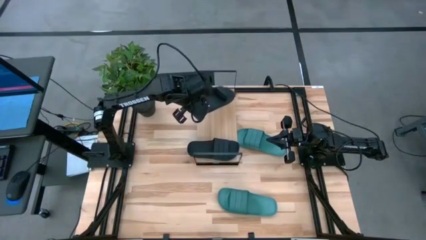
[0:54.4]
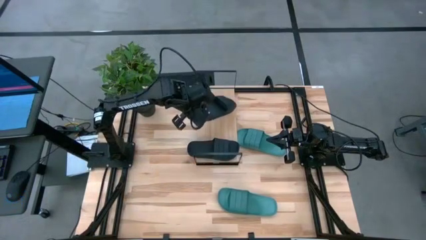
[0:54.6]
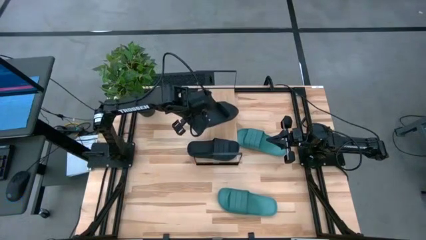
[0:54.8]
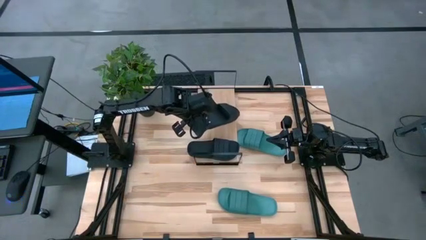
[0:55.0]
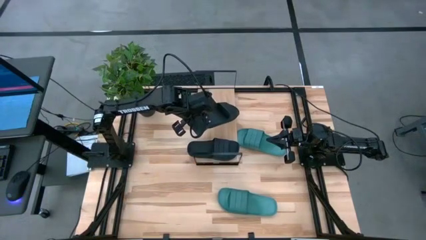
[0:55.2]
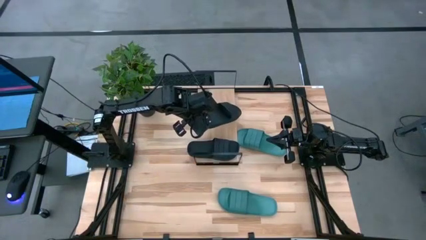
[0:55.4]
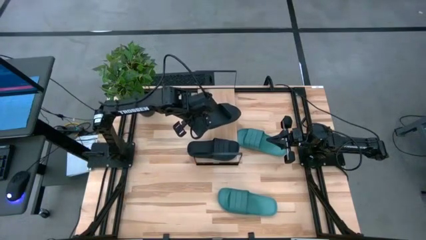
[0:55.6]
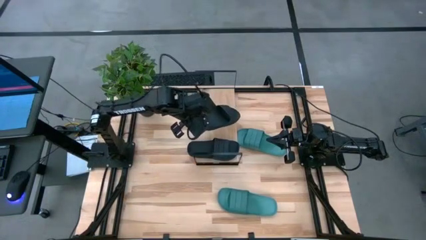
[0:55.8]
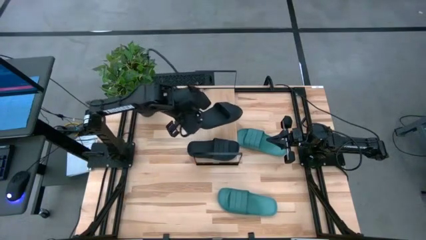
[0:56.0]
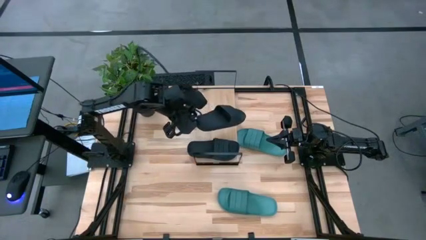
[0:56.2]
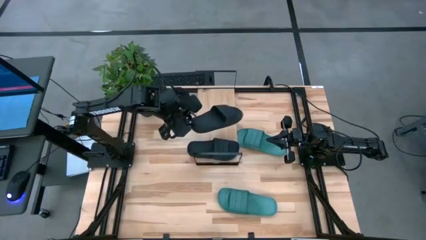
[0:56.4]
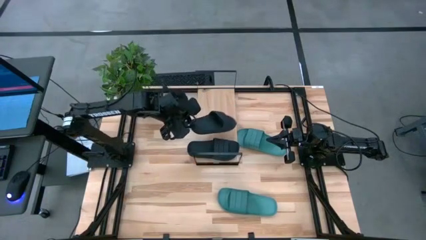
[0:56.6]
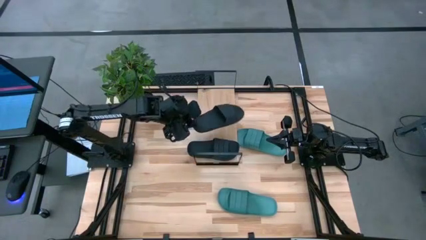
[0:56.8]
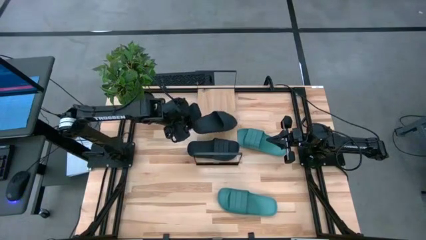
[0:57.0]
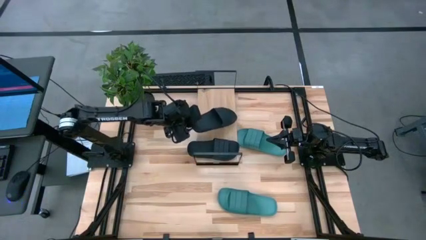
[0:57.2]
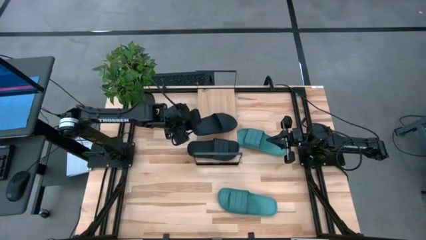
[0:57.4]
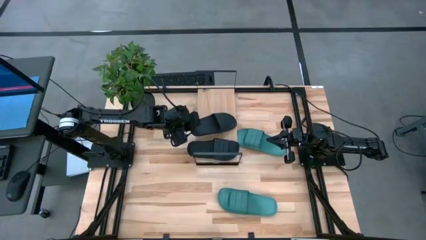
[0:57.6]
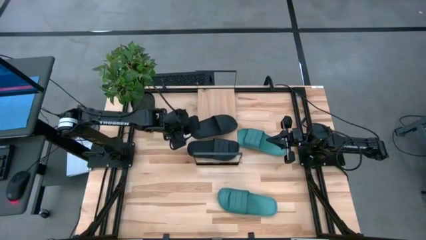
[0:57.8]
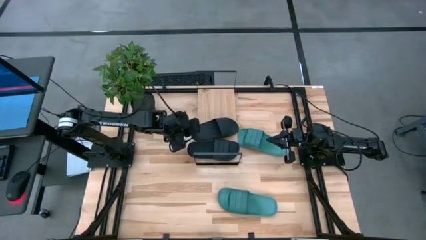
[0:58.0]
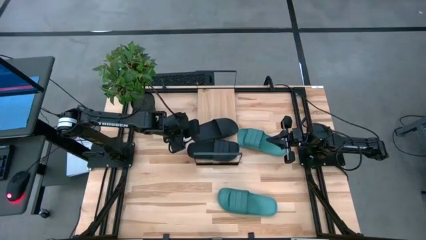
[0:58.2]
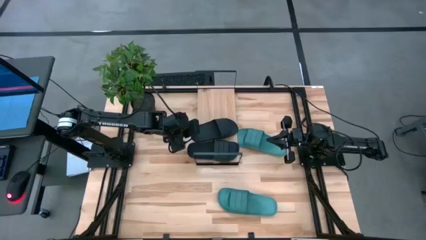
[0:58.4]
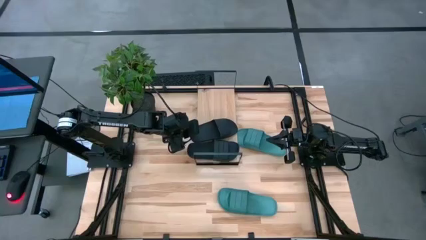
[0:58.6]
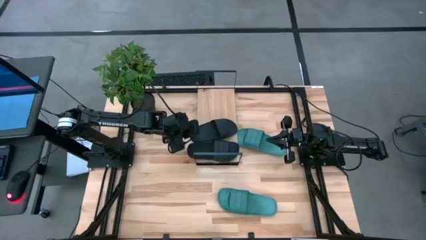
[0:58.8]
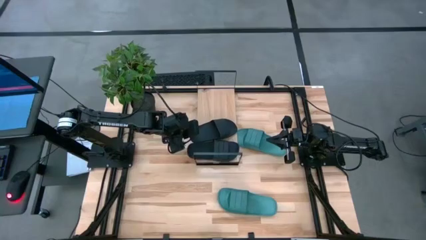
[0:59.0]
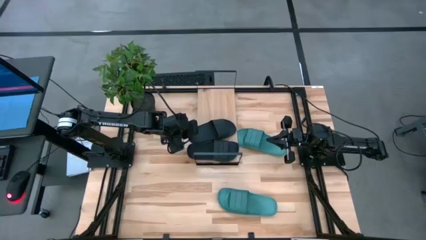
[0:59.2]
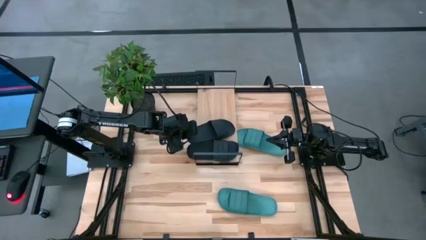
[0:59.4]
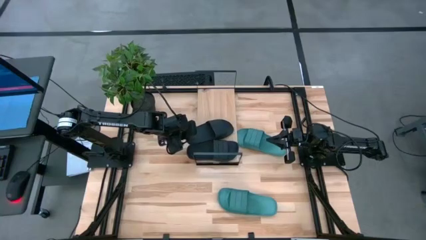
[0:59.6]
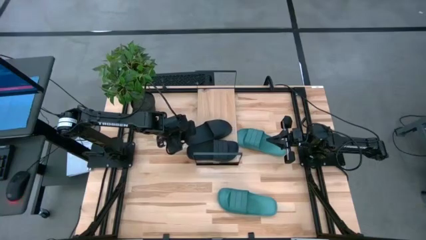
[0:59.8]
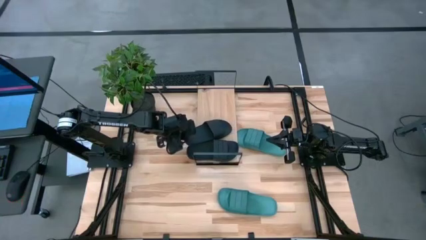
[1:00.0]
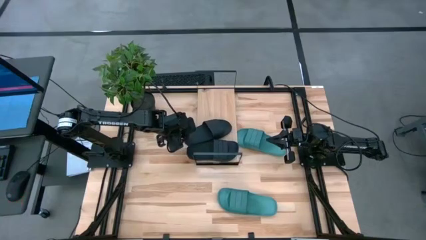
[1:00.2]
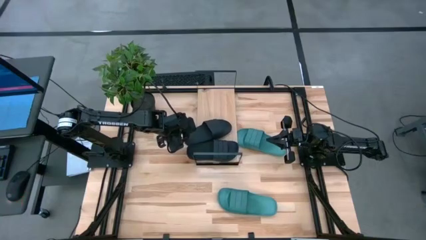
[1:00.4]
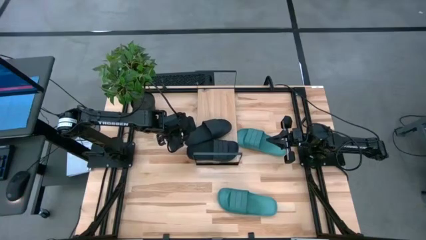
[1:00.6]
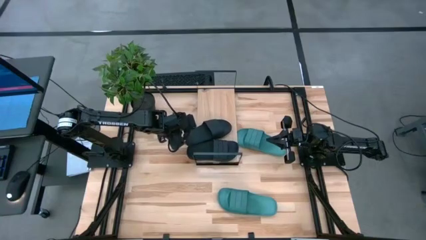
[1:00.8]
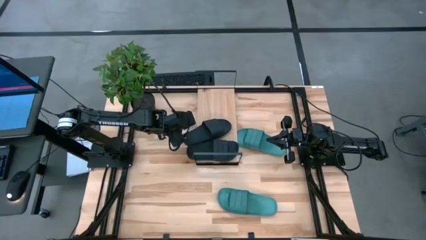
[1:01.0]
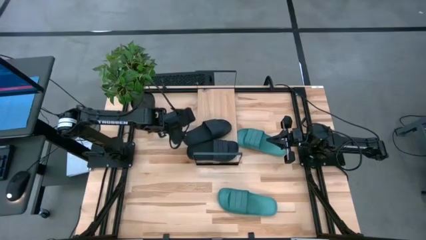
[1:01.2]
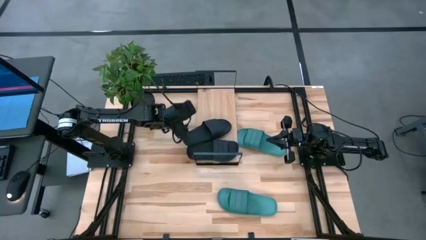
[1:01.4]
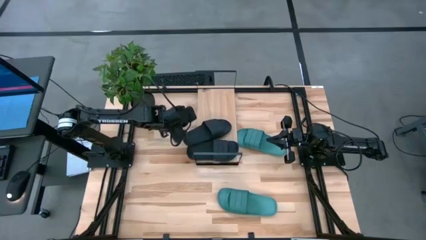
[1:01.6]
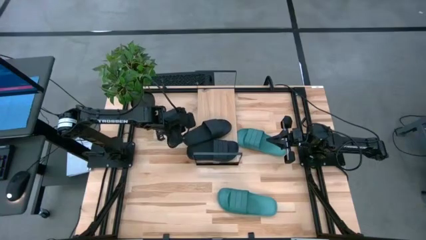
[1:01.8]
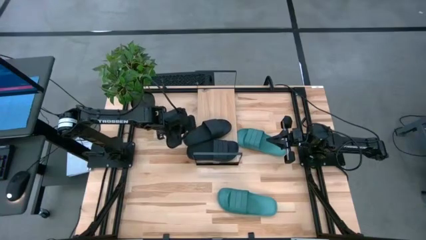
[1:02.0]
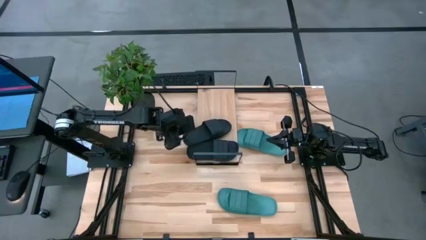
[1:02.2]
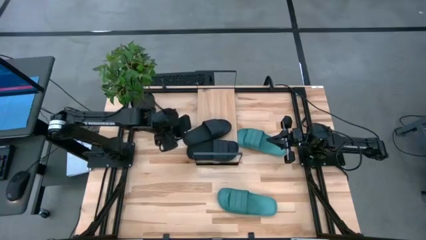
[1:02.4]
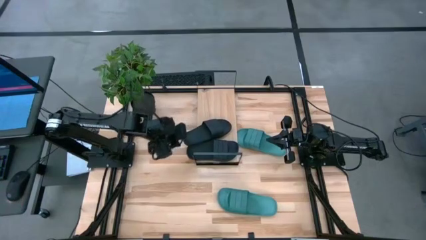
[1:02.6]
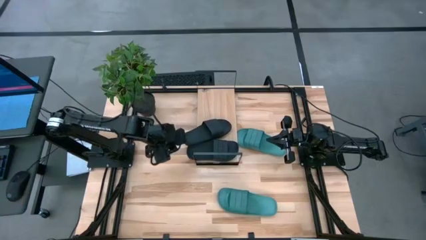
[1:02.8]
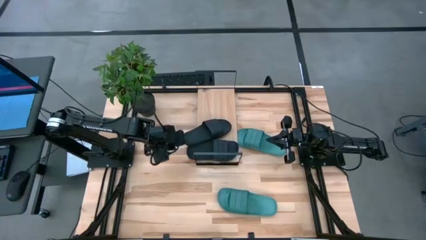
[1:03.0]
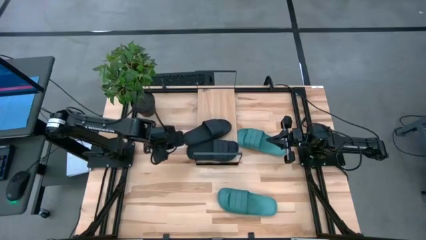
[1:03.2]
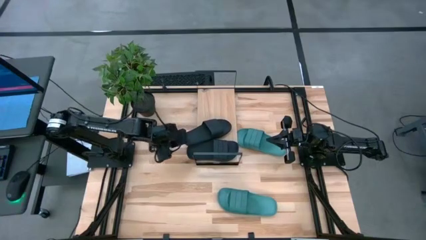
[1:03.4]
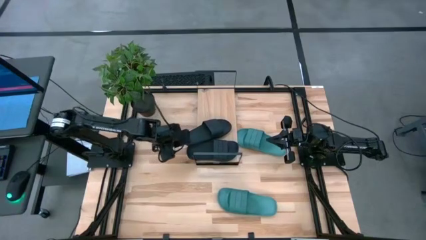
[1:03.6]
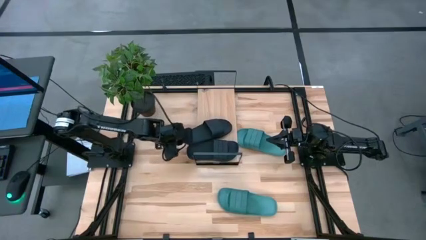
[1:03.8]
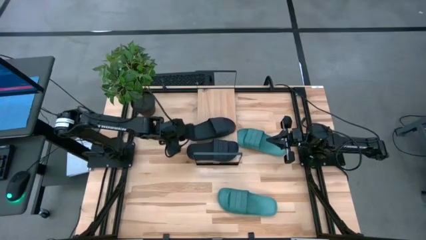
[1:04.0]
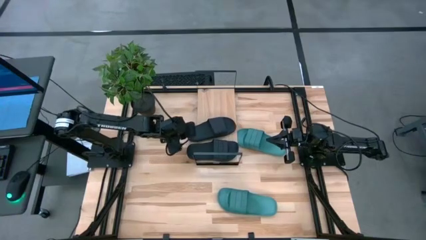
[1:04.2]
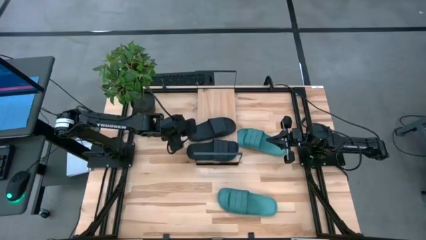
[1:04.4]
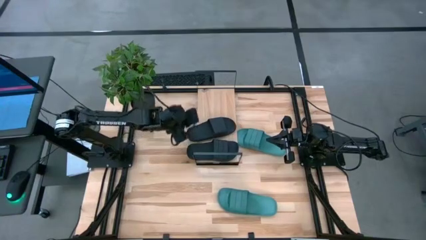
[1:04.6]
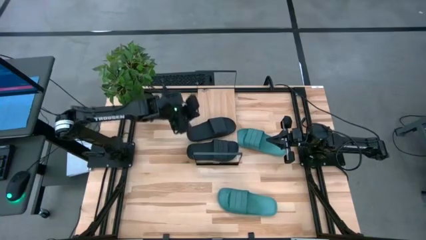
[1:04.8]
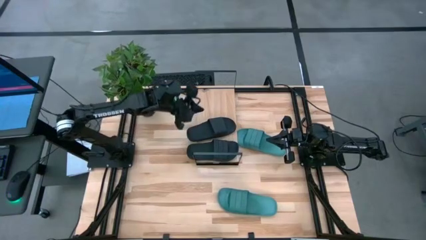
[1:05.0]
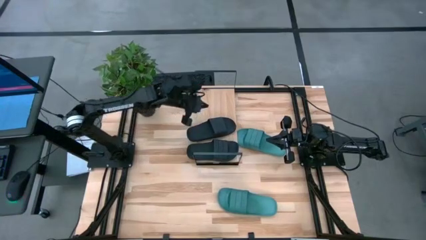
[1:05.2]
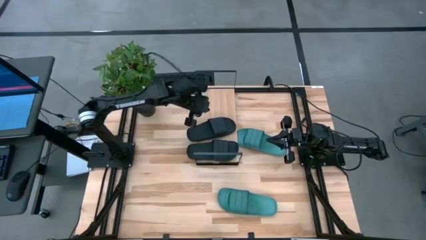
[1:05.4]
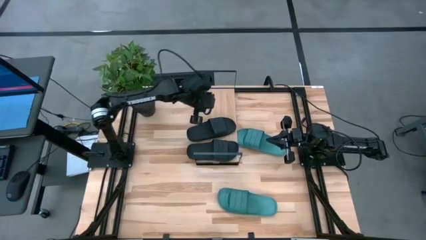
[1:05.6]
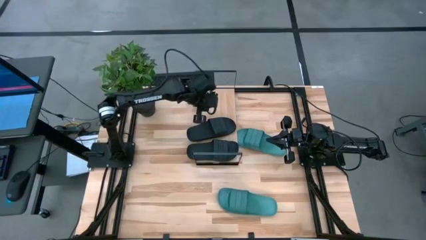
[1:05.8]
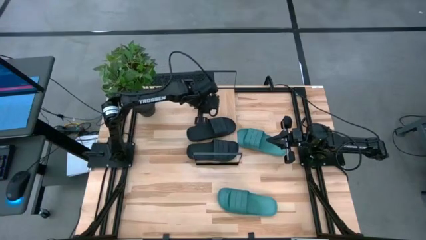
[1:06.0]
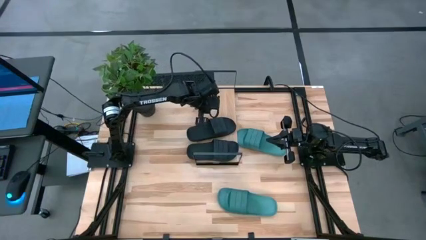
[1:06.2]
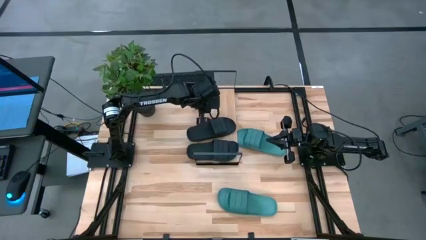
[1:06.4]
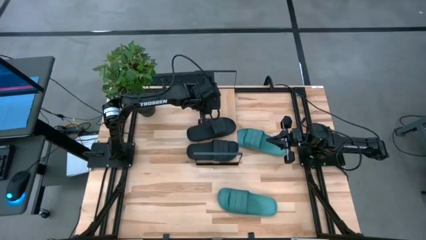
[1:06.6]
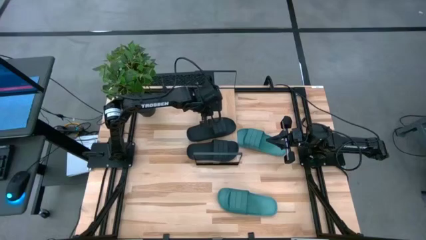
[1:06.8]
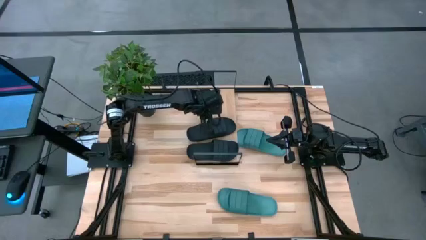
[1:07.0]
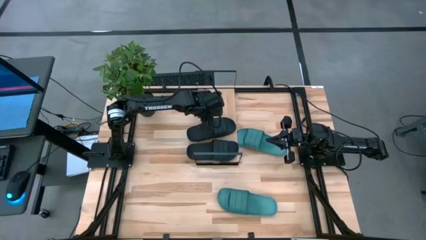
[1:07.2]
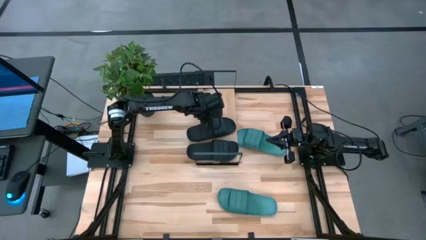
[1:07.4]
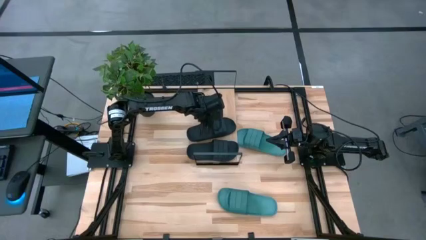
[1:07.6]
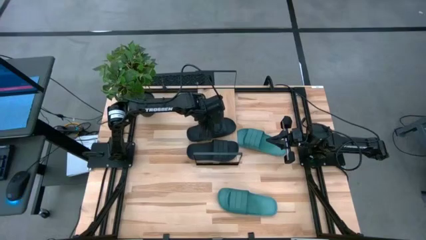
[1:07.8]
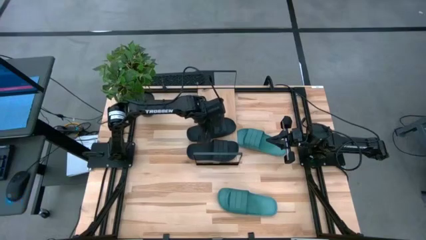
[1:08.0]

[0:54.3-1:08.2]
Task: Pick and place slides into the shelf
Put the black slide on the shelf

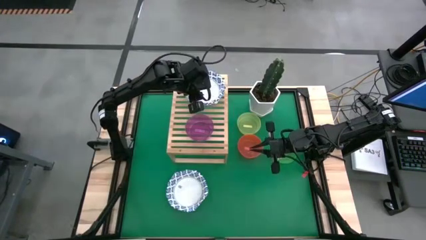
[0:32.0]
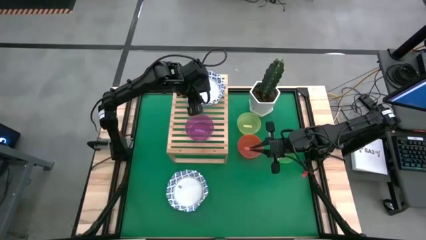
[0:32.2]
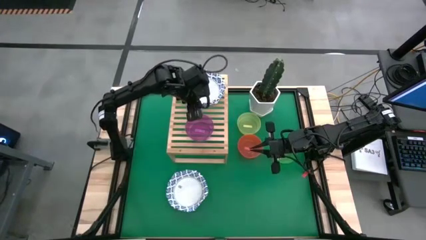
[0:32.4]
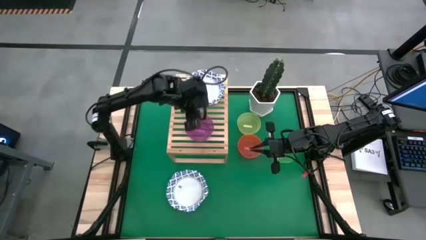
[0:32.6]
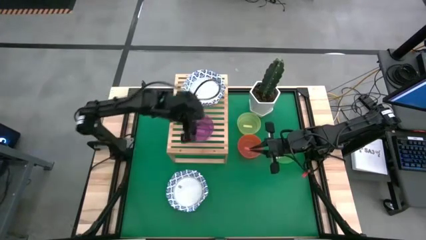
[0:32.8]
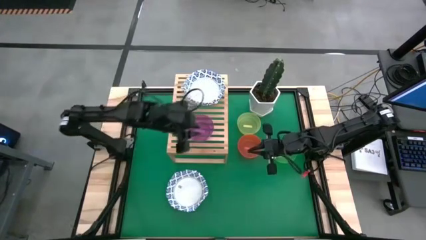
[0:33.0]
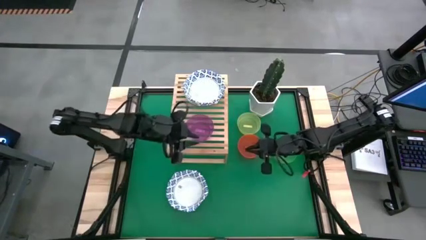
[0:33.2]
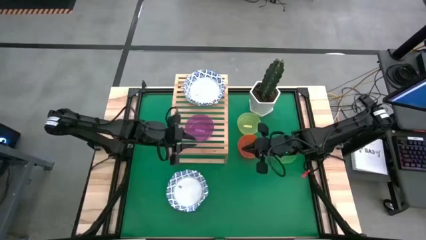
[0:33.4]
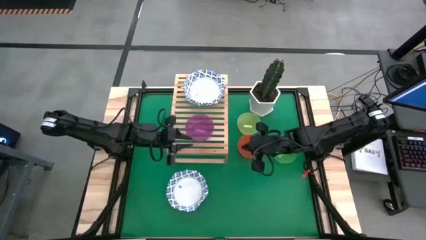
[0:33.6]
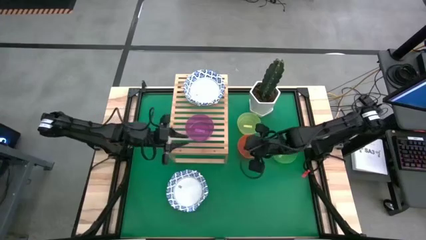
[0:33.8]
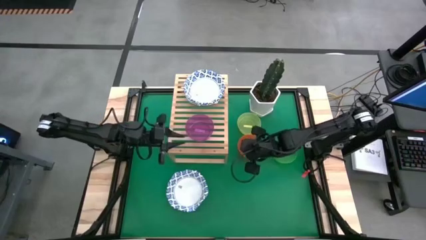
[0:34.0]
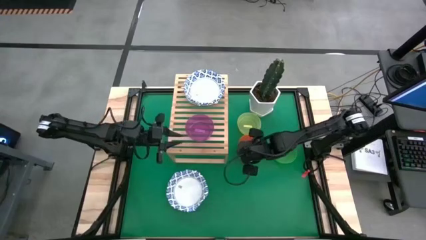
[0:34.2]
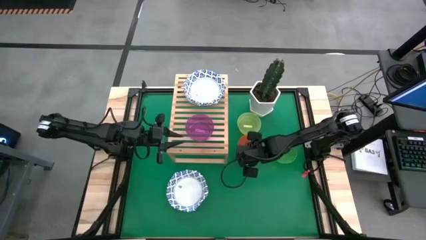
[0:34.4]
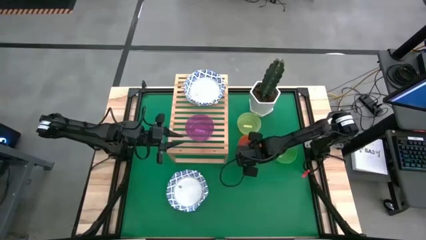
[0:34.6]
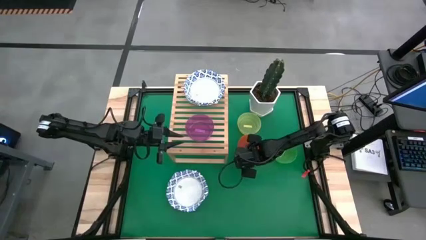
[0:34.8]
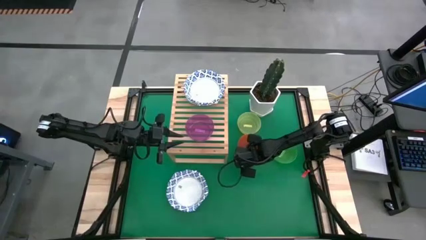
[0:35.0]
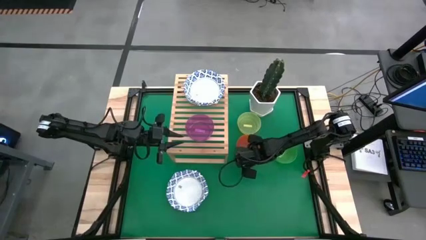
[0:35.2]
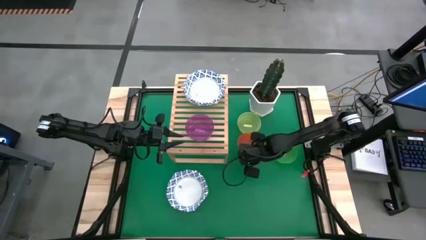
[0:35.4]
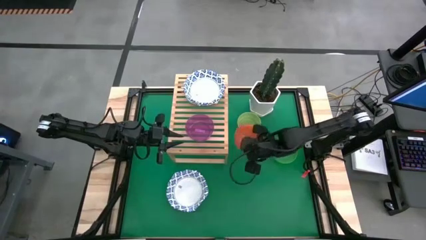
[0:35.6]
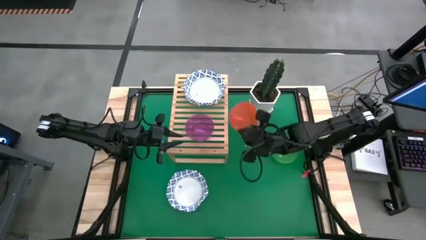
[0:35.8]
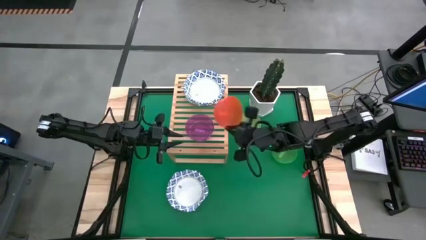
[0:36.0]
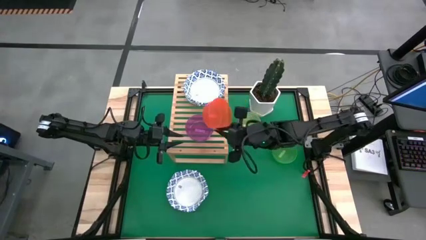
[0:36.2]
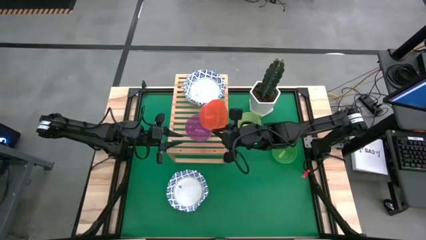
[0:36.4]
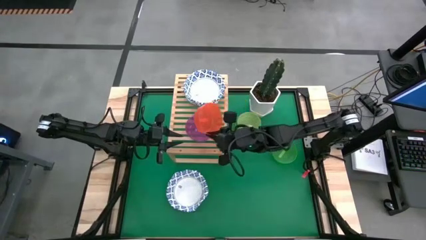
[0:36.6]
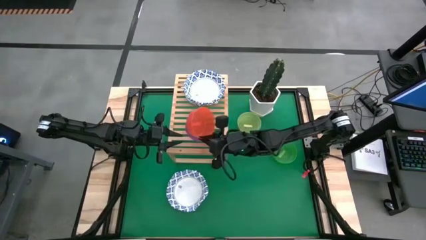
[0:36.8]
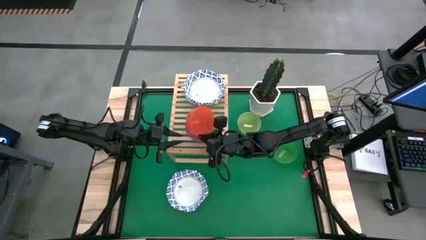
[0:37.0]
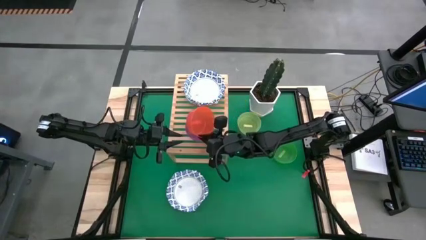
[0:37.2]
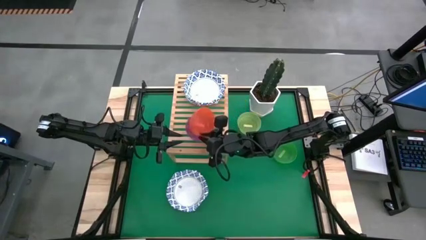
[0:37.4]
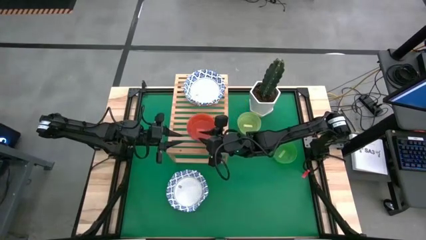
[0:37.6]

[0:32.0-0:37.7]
Task: Place and stack bowls onto a shelf
Stack the orange bowl on top of the purple bowl on the shelf
